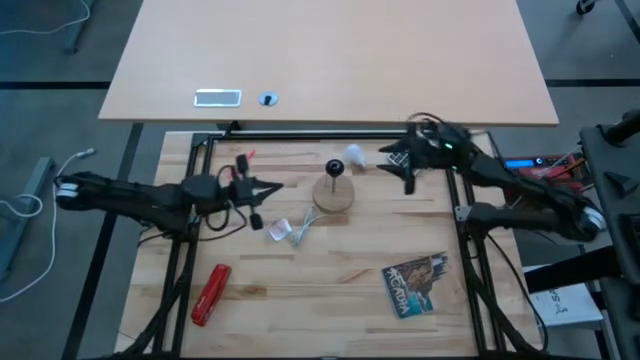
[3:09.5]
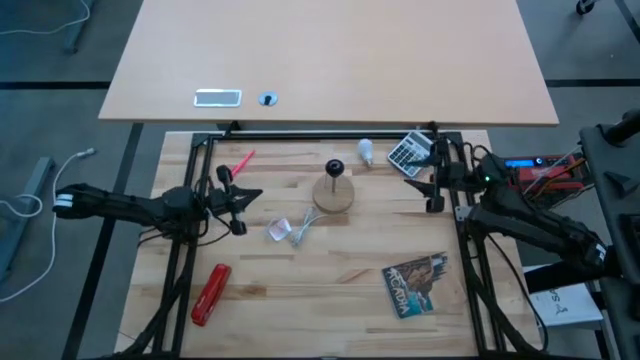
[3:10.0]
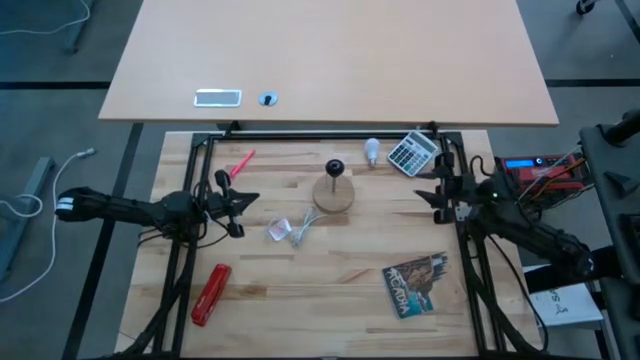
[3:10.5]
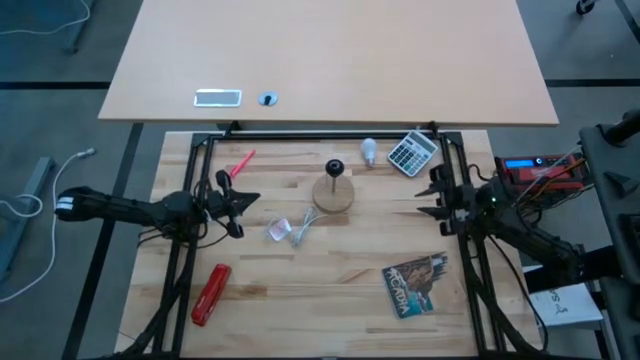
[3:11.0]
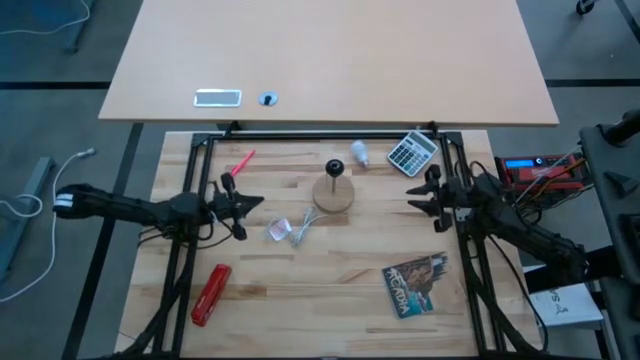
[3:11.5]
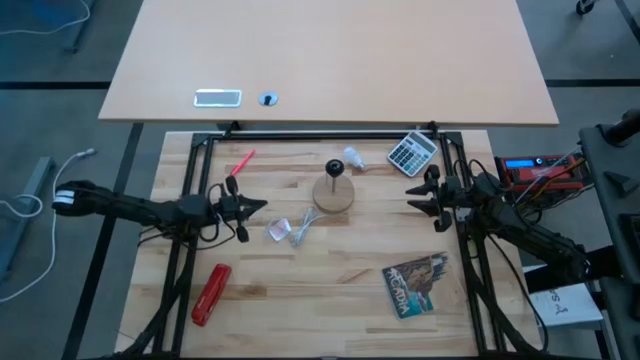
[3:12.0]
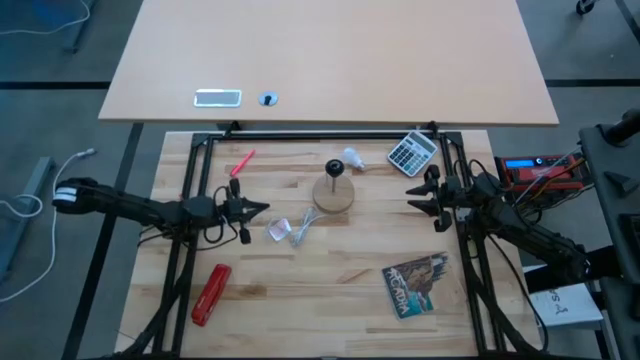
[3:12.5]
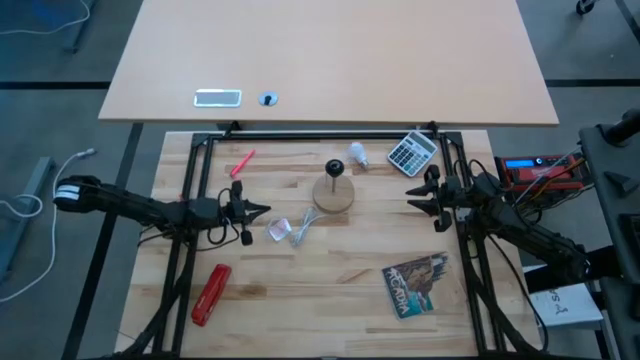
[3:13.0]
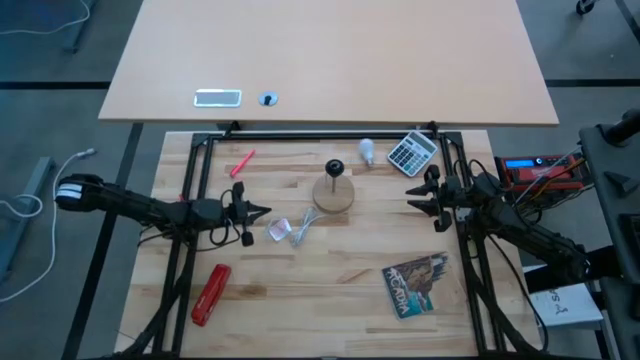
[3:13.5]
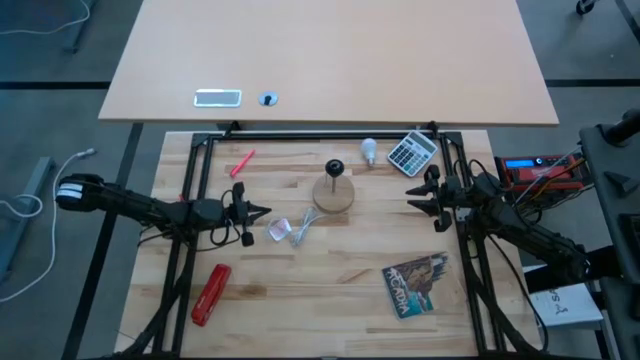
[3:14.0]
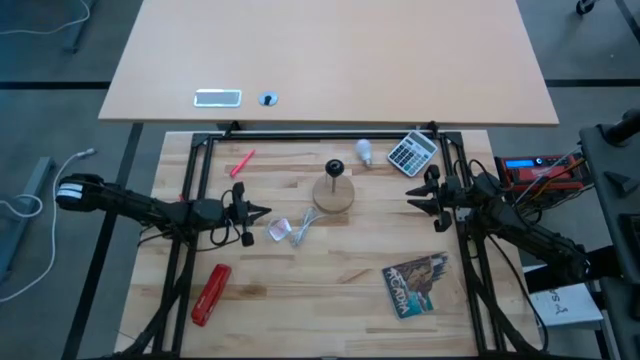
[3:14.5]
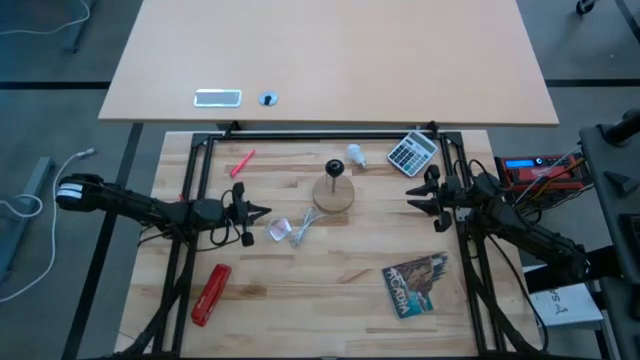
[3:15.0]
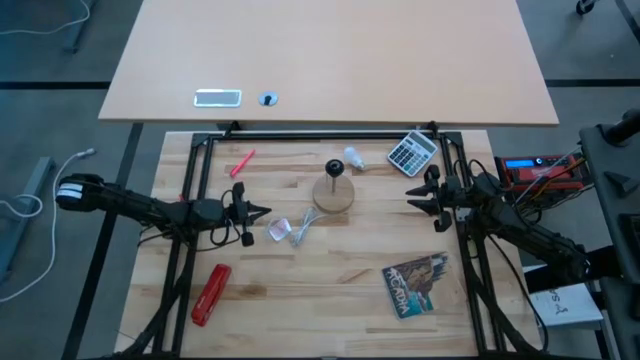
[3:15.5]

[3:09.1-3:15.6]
Task: Screw lightbulb
Return to Home Position

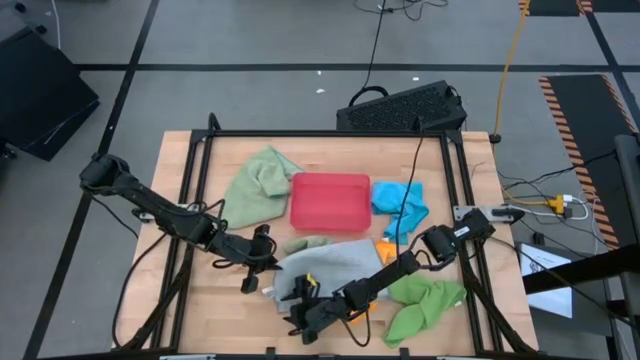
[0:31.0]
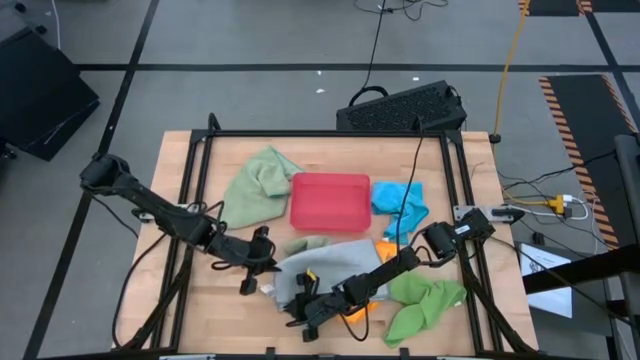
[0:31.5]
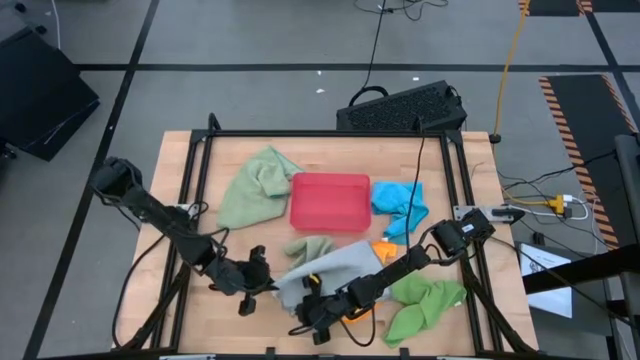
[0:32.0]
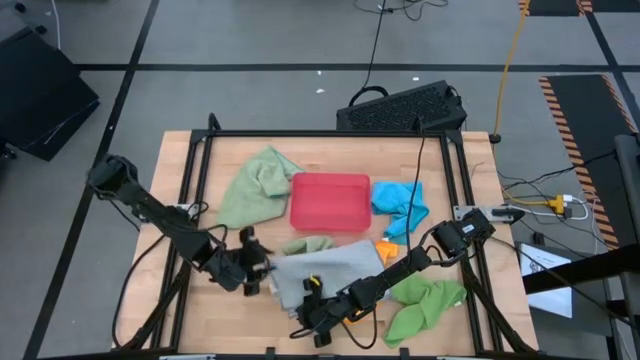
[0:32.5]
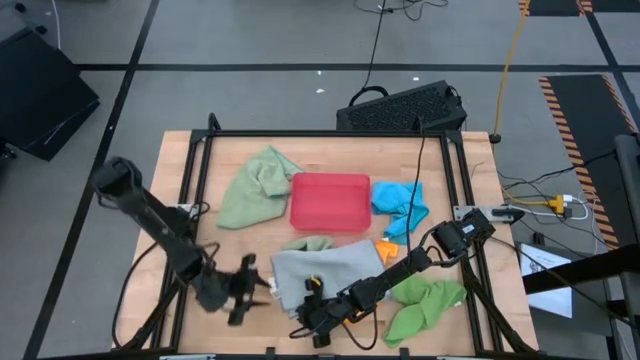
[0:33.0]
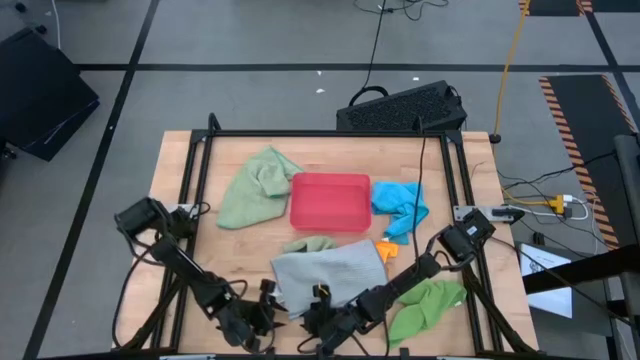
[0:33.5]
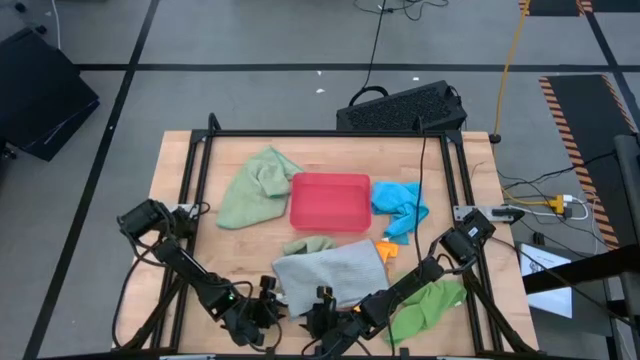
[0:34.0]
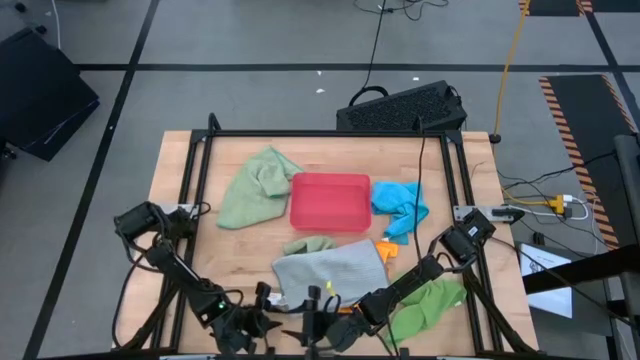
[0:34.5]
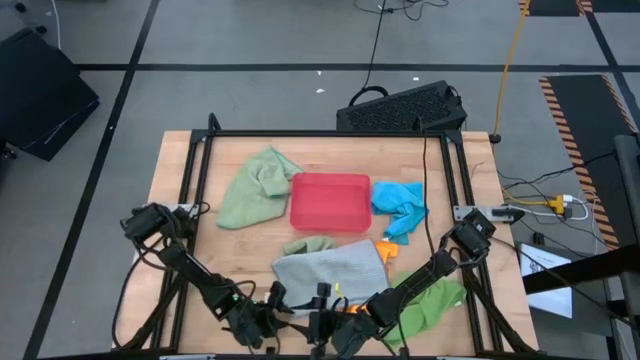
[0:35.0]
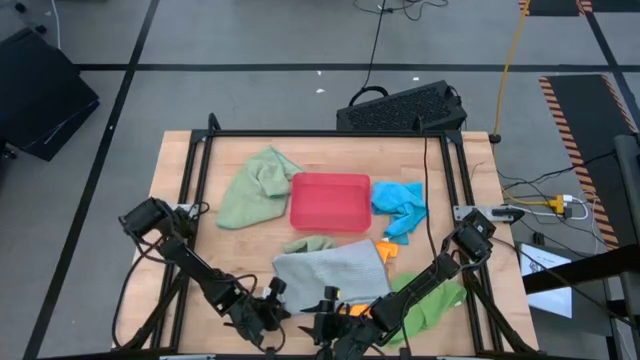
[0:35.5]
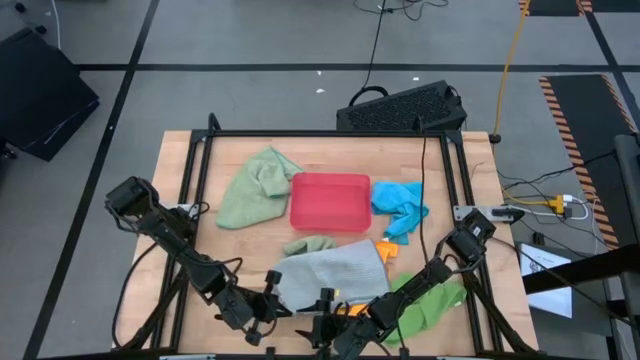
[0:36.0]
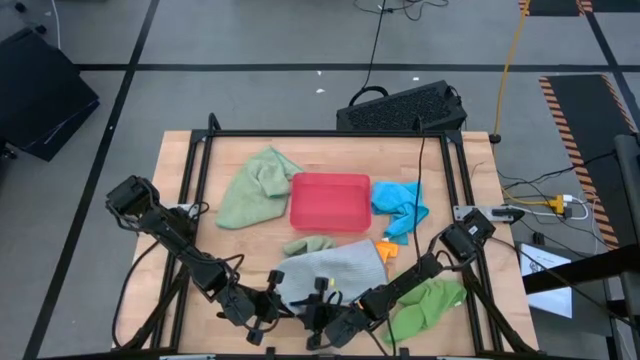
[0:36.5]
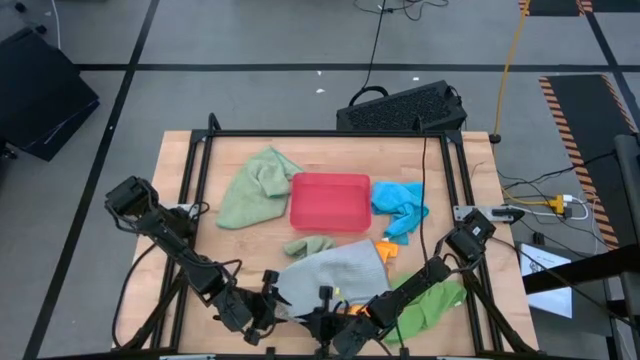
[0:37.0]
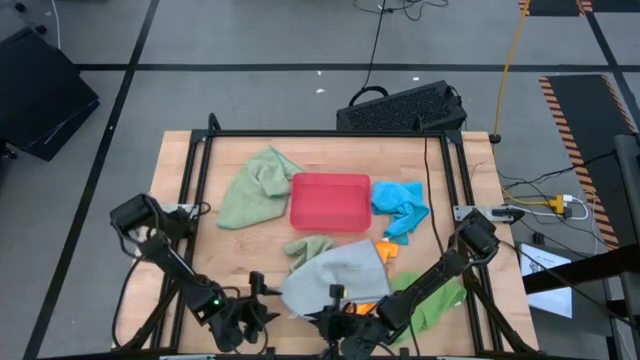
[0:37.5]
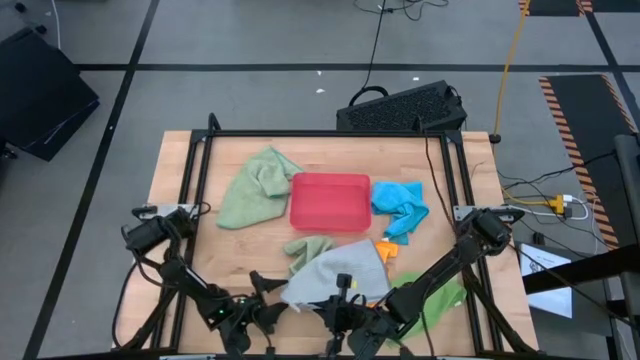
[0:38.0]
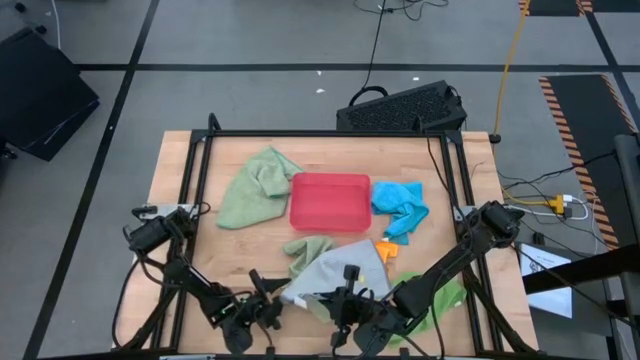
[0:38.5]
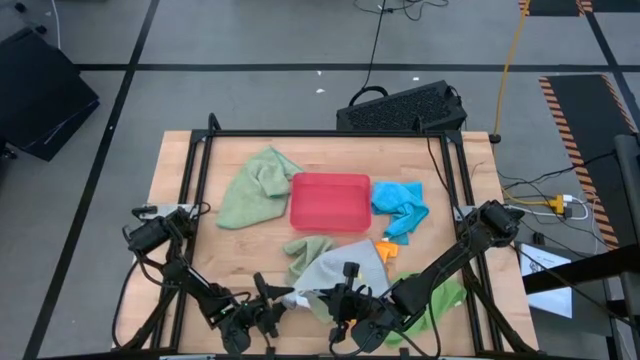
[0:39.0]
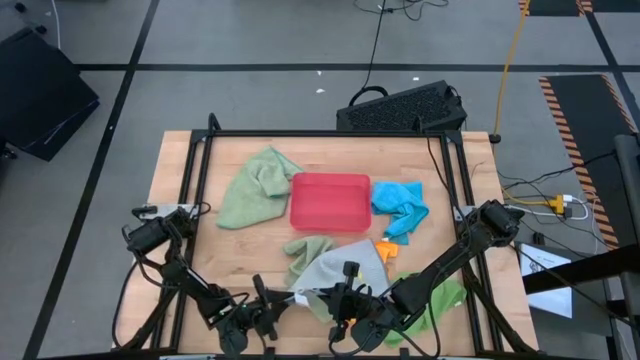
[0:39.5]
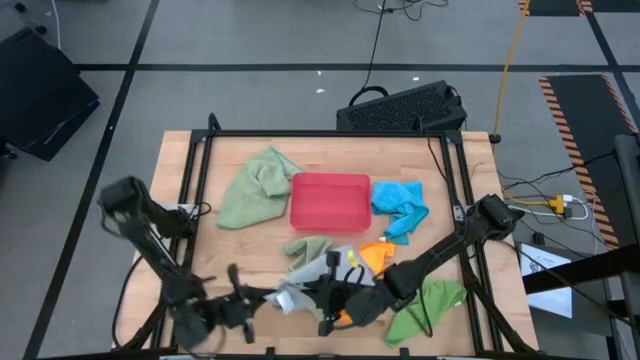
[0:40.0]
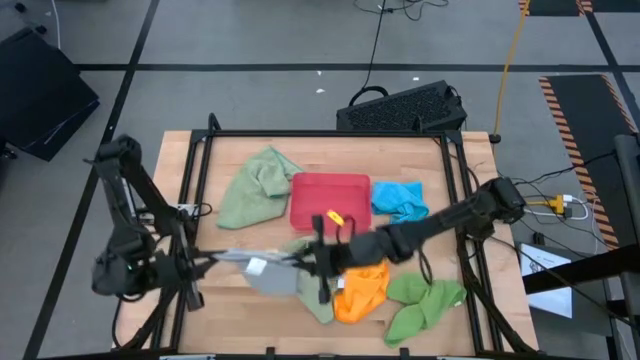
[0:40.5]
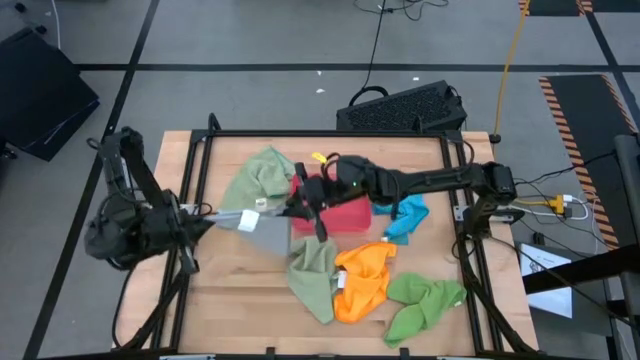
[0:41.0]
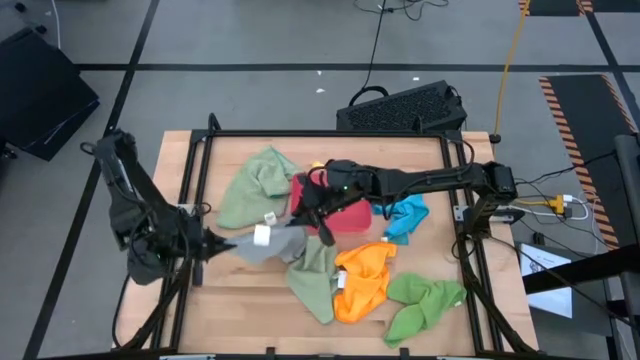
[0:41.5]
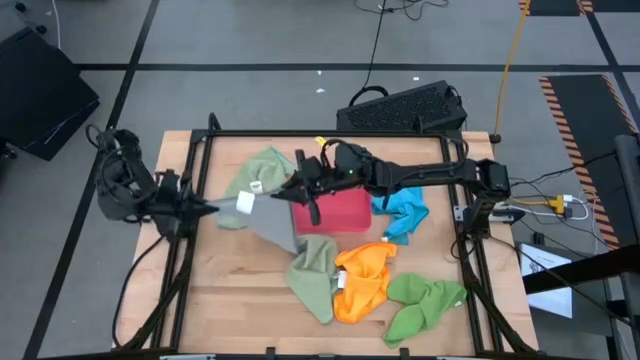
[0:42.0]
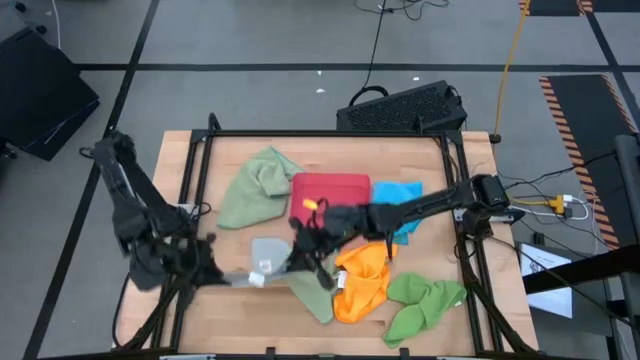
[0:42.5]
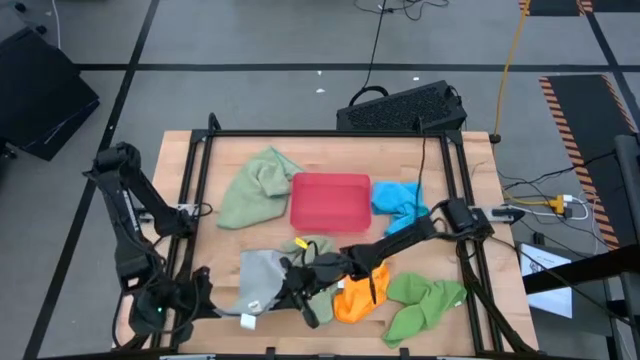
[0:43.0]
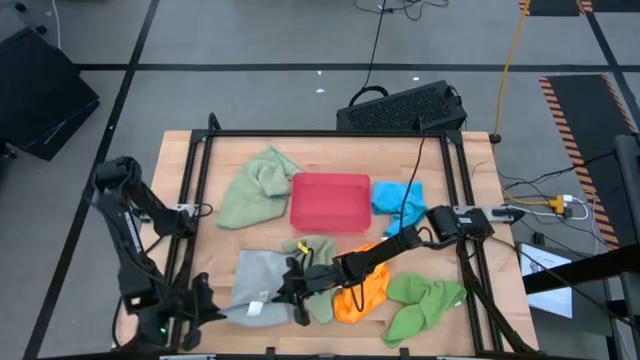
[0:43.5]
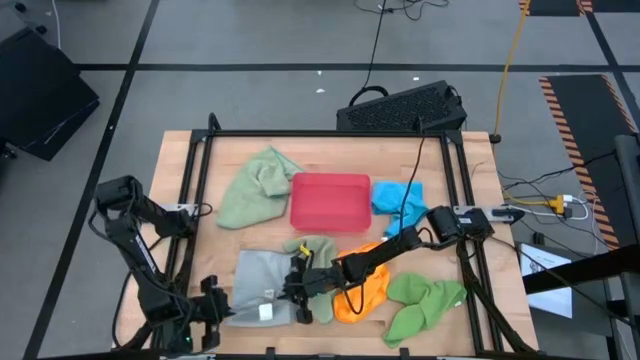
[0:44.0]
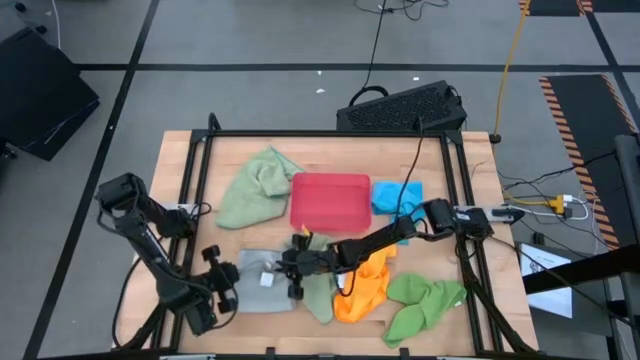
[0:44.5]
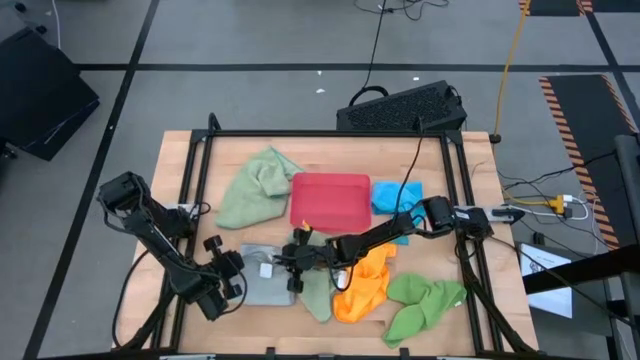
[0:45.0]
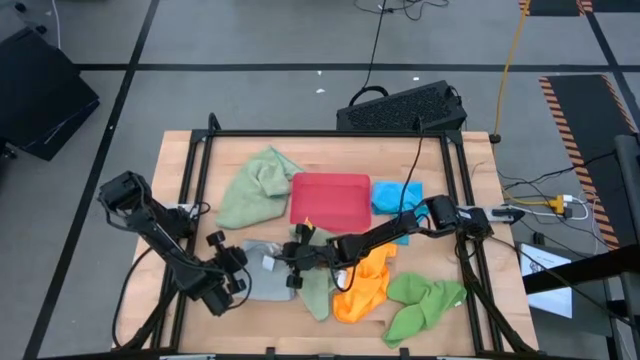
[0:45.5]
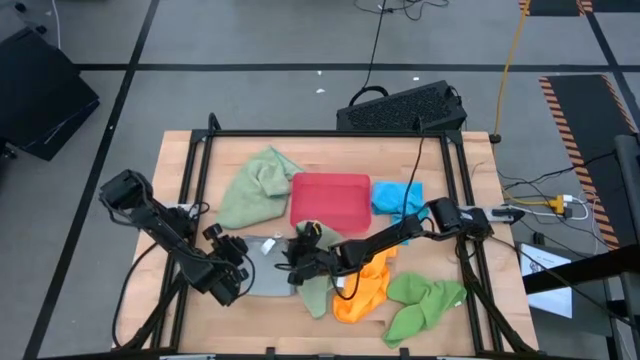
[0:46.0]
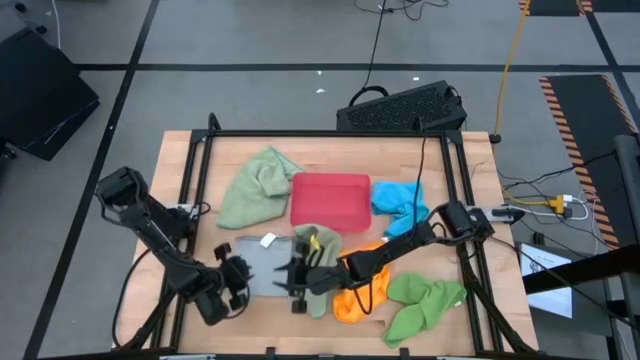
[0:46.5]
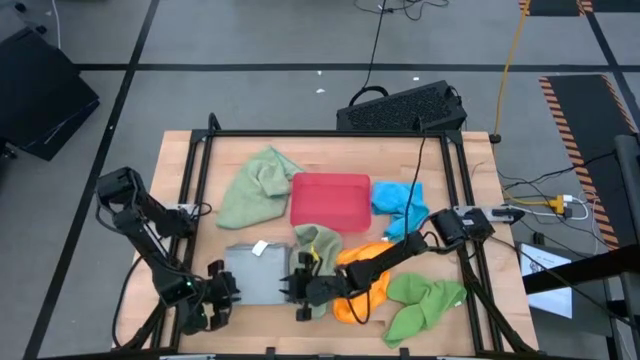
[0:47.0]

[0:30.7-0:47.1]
Task: Fold microfiber towels
Fold the gray microfiber cloth
